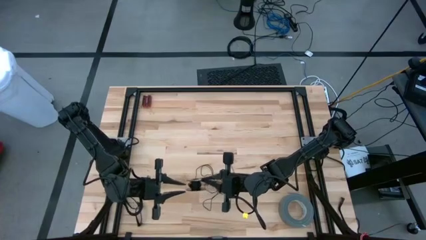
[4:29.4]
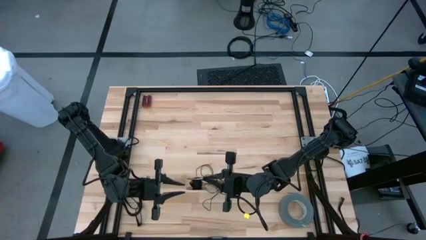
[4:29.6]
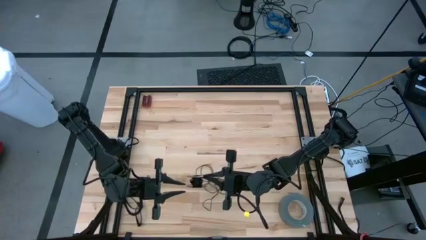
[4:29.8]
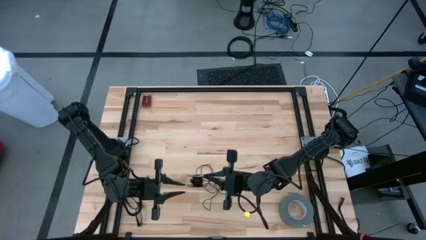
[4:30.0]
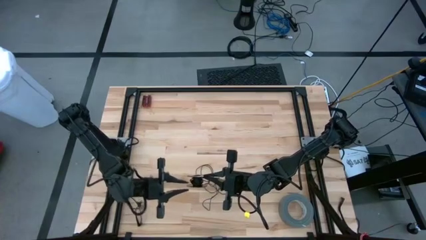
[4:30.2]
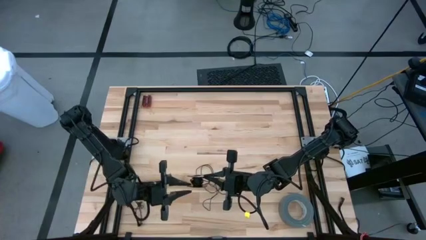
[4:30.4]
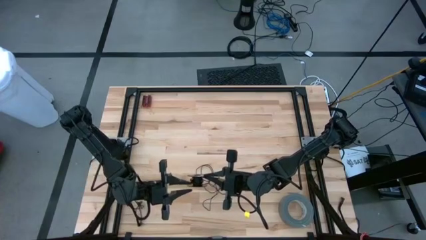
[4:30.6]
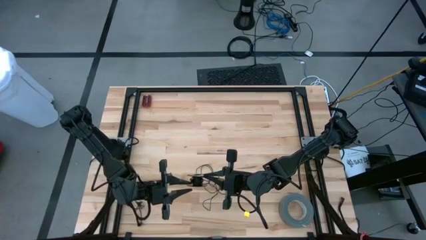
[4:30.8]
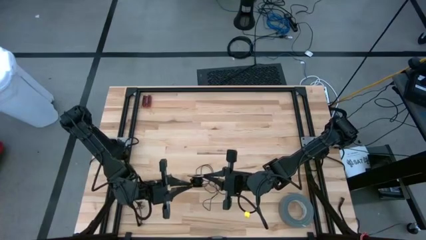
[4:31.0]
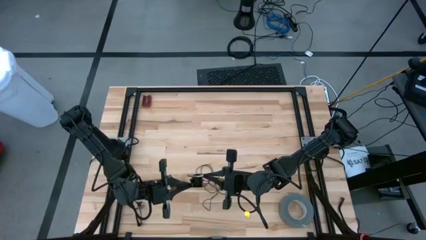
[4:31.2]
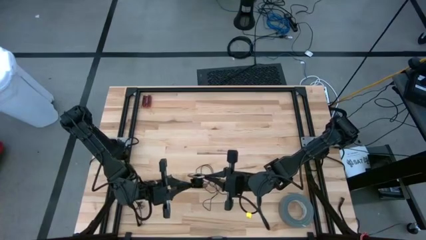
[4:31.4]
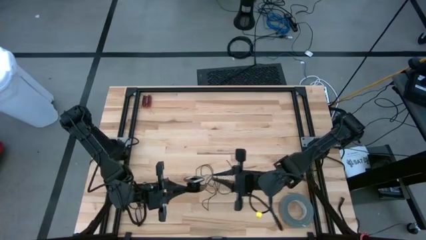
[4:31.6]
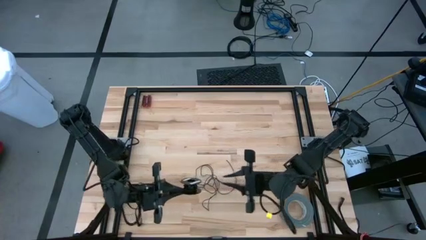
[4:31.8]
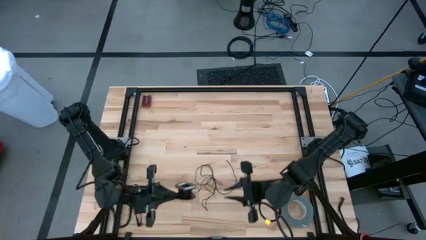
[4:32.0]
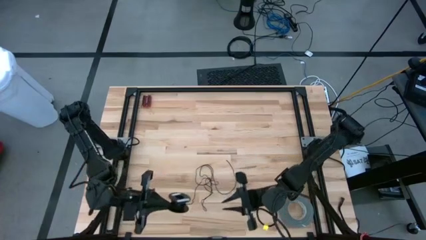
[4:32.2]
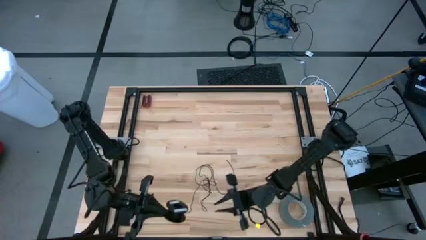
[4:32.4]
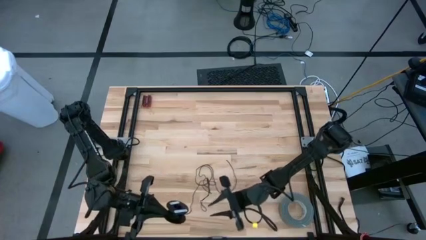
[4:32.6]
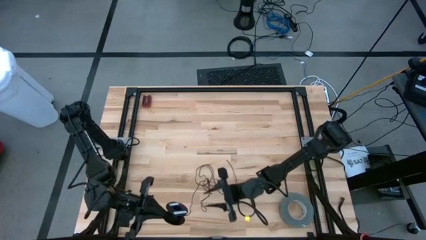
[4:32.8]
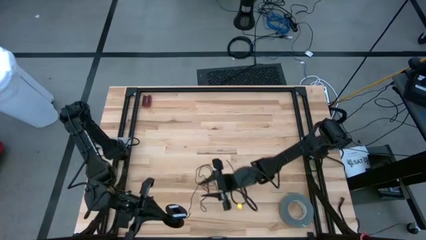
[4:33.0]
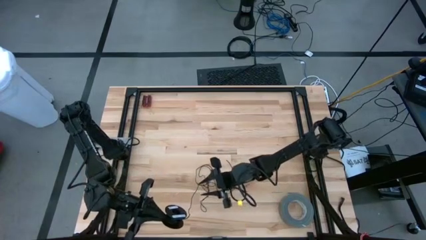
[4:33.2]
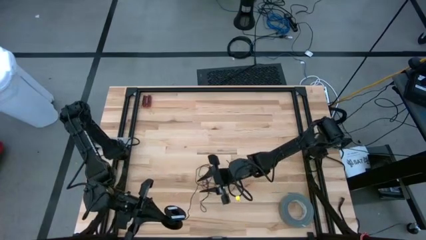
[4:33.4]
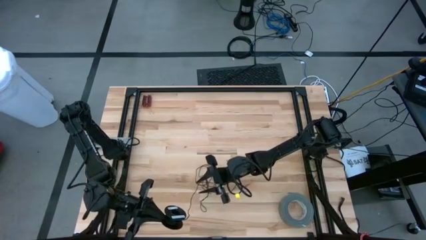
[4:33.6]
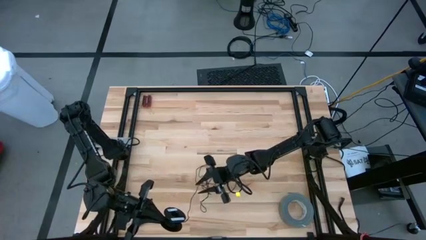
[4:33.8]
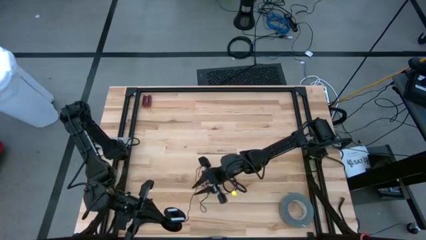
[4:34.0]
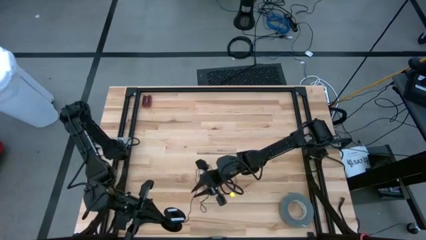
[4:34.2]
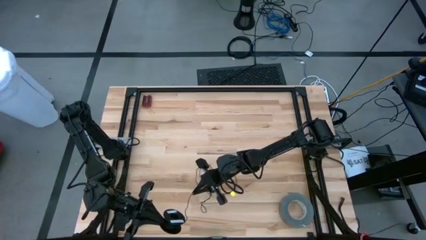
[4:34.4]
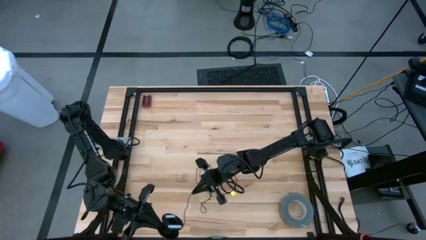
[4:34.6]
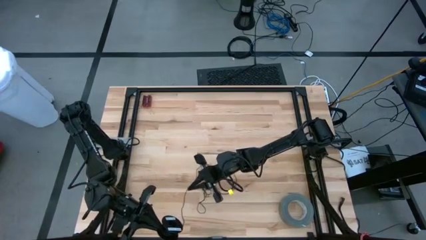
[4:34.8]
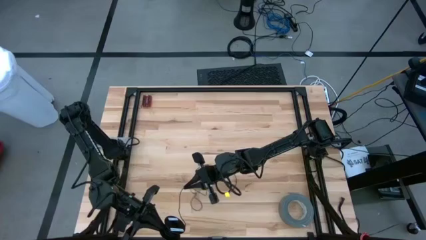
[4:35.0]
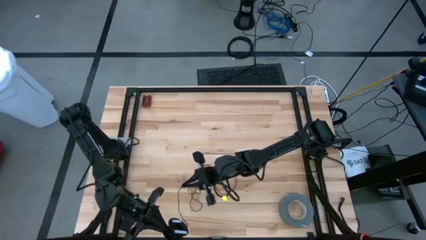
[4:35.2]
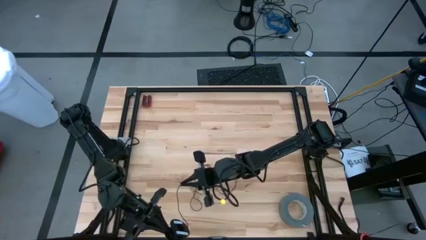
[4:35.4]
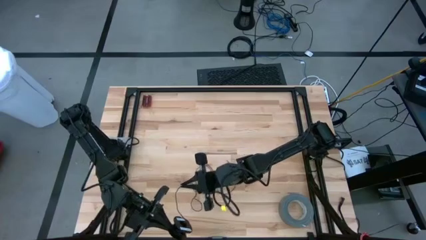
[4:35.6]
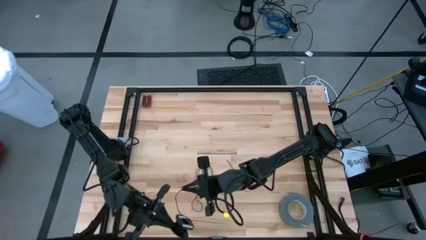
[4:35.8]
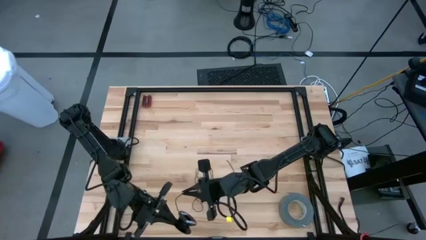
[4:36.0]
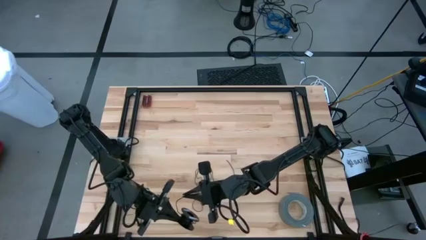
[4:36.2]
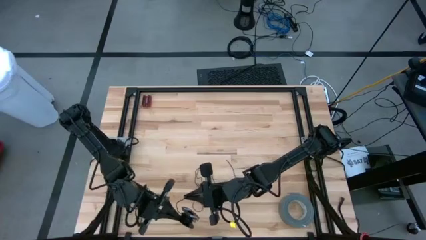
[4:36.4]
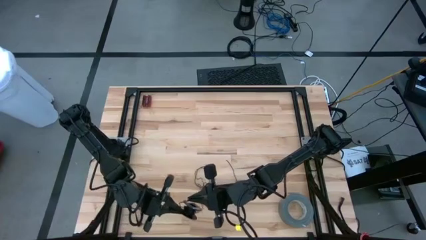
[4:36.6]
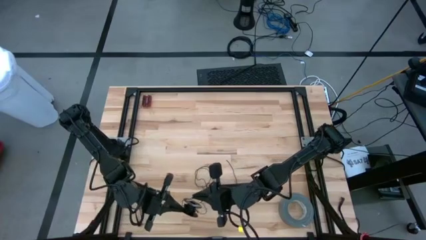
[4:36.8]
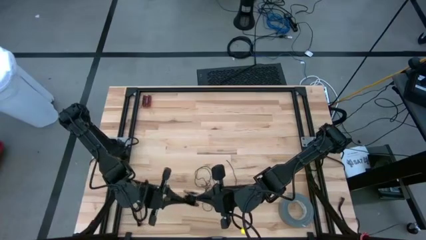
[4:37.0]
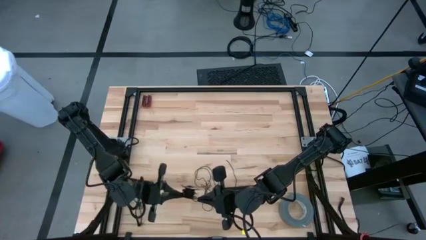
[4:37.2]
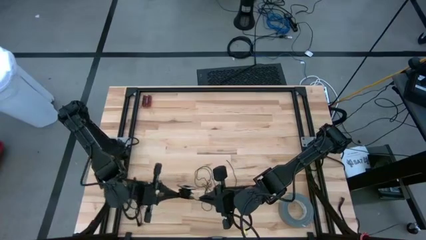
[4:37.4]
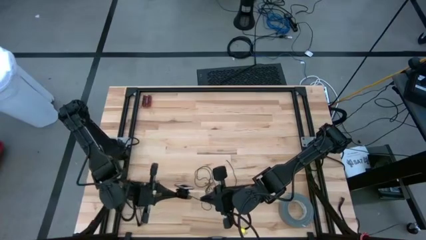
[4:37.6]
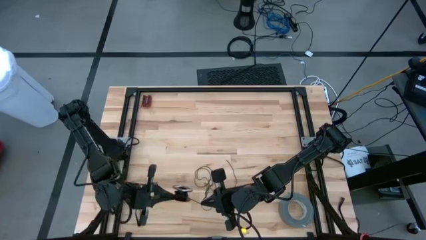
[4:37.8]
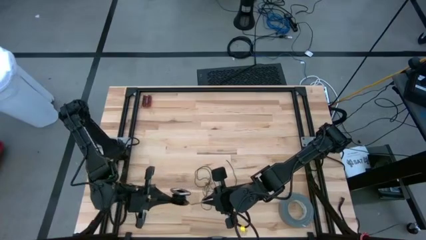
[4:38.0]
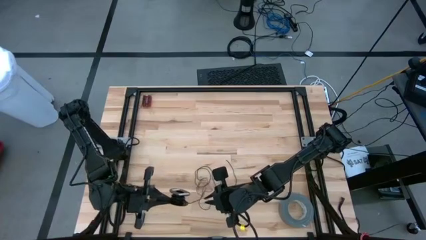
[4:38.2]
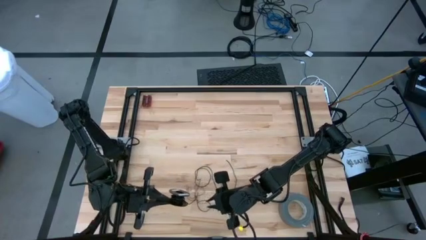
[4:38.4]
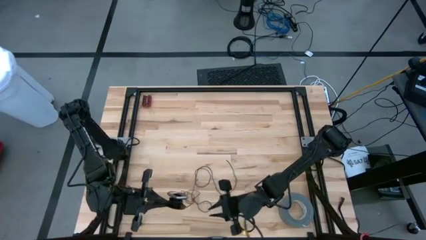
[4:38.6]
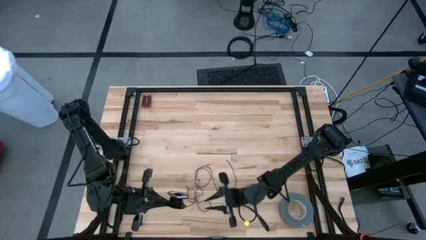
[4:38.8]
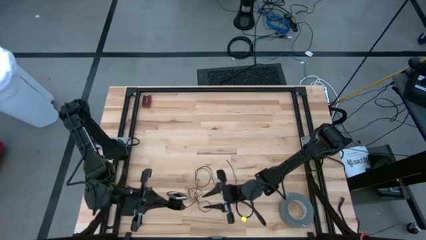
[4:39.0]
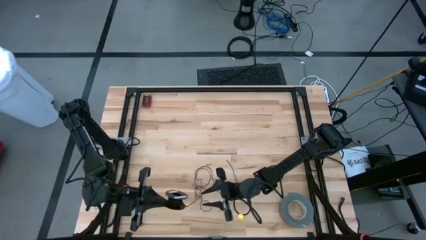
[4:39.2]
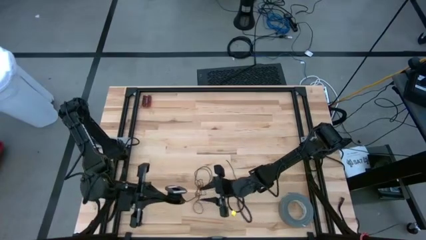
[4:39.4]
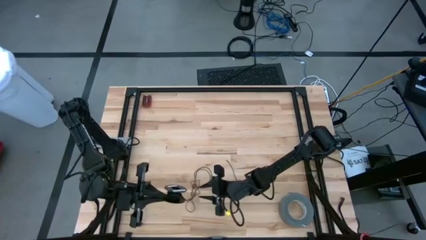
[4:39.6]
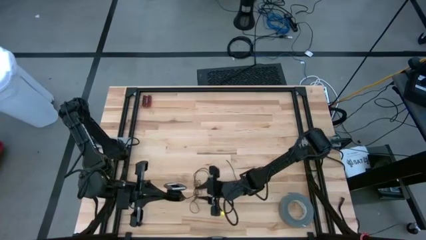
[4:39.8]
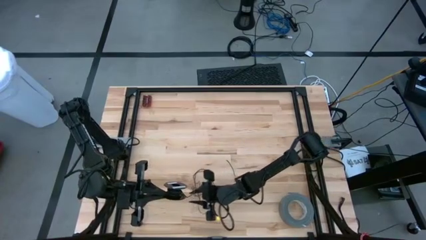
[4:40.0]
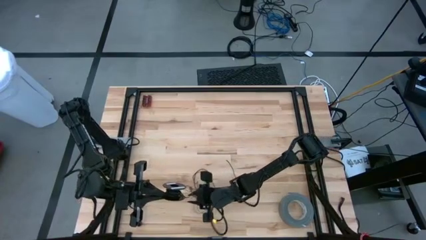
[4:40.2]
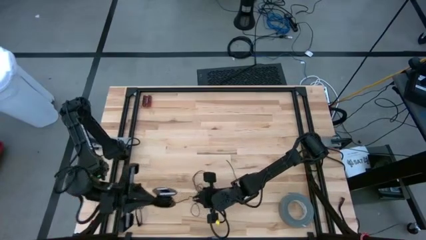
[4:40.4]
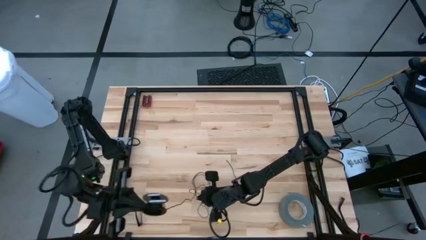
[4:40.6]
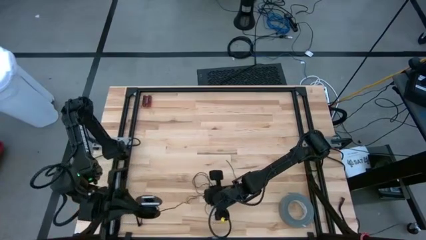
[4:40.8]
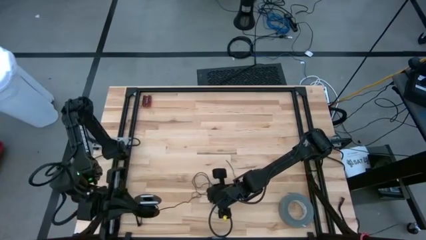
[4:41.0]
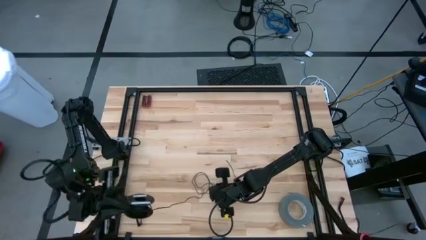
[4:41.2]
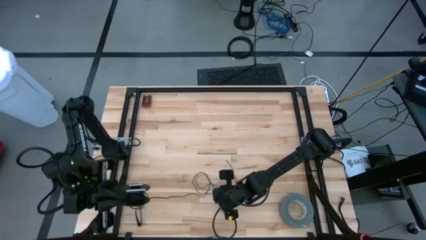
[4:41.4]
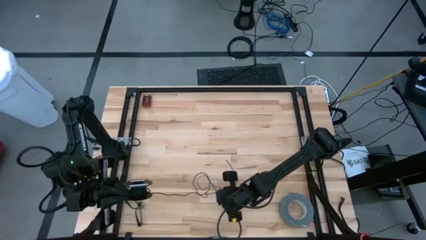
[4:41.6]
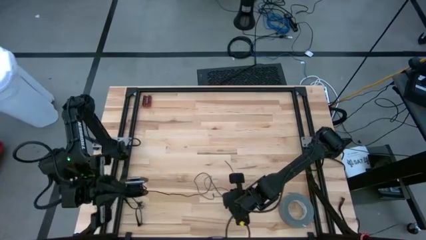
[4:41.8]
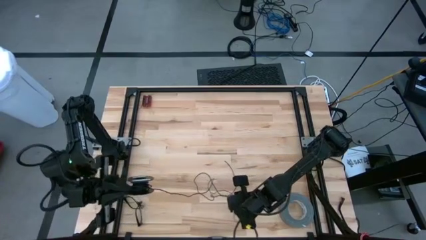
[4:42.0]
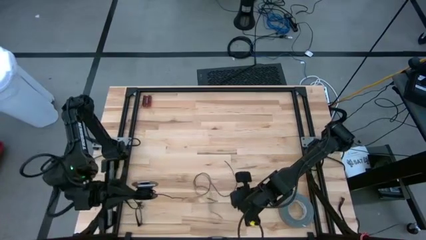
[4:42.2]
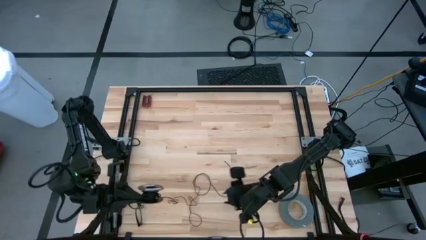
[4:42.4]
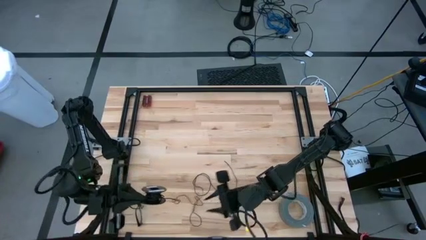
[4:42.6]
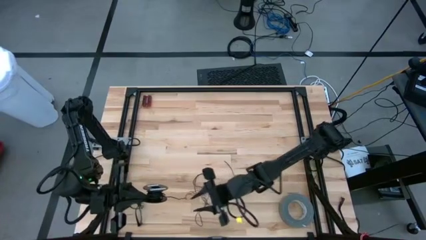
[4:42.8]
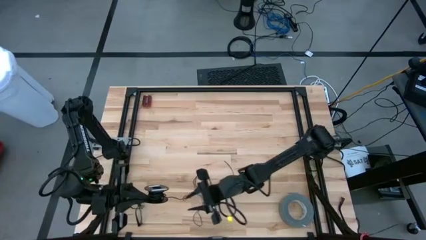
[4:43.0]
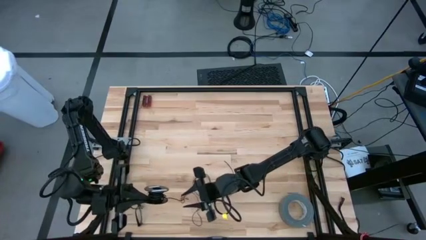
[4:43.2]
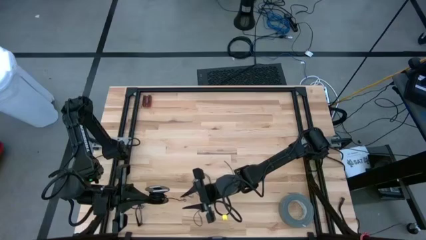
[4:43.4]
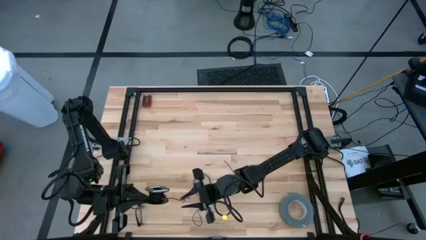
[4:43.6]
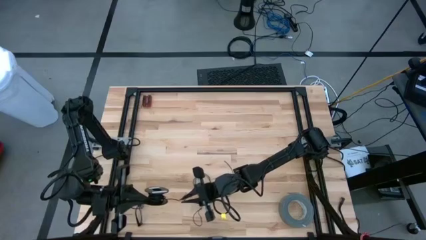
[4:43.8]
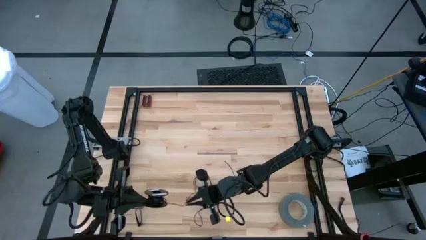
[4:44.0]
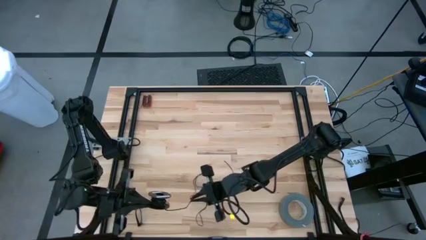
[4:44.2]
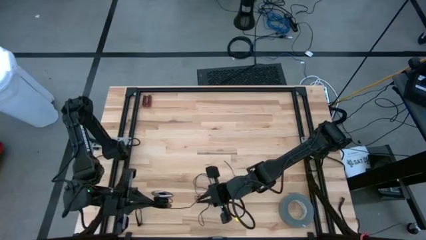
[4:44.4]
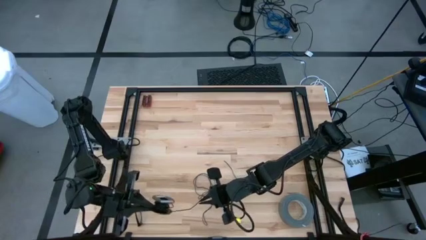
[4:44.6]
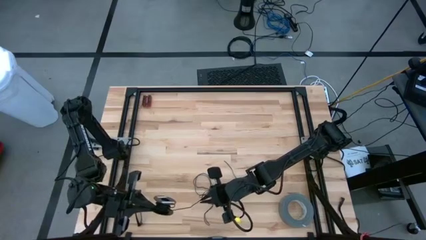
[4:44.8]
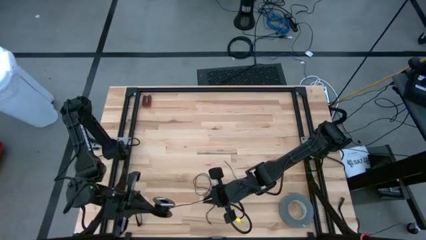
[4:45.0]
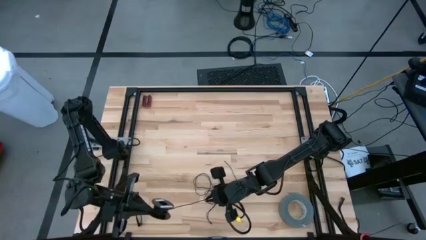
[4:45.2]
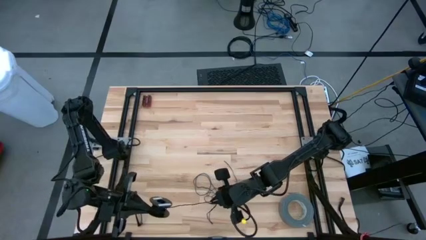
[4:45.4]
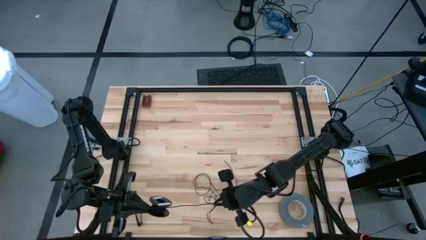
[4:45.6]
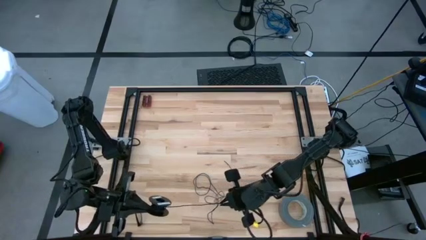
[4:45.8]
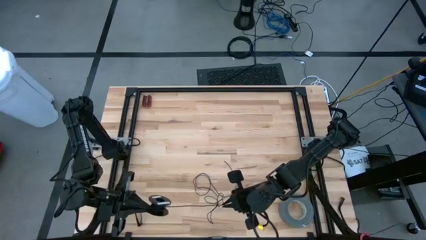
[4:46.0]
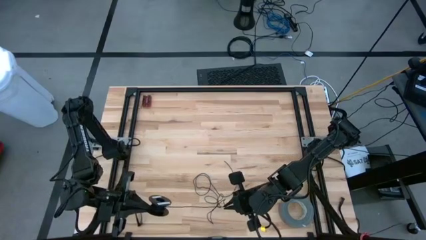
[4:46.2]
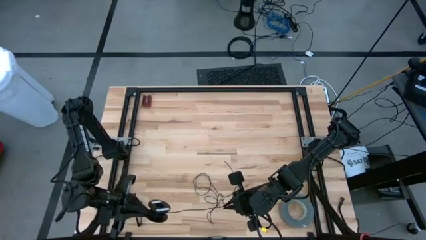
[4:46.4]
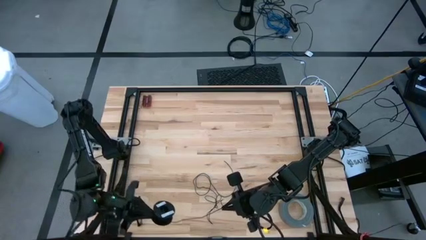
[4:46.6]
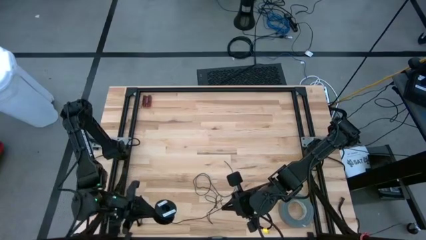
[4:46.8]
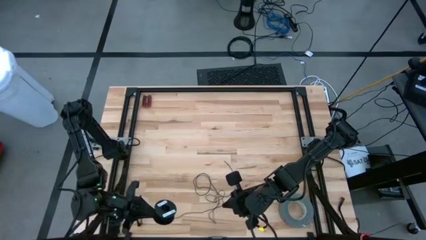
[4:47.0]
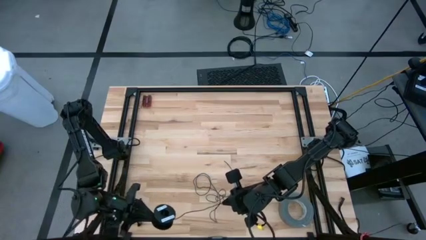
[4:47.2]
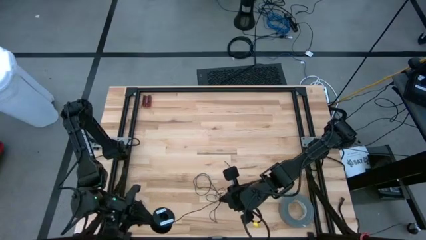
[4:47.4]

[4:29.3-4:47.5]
Task: Coil cords
Coil the black wire on the spool
